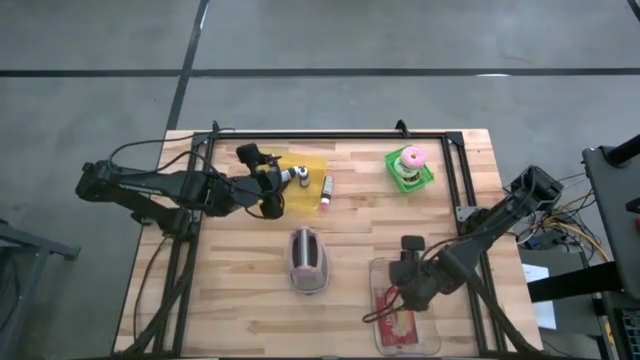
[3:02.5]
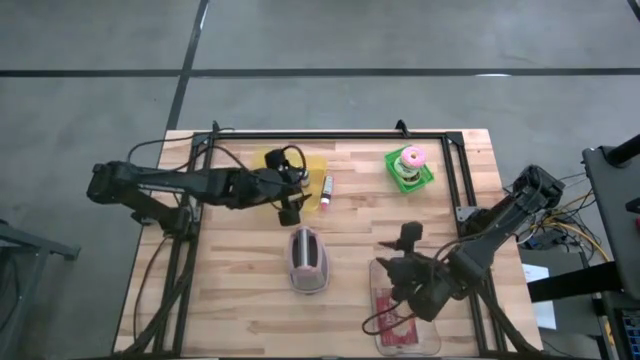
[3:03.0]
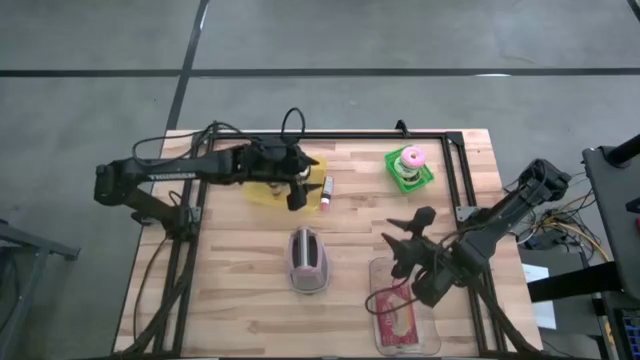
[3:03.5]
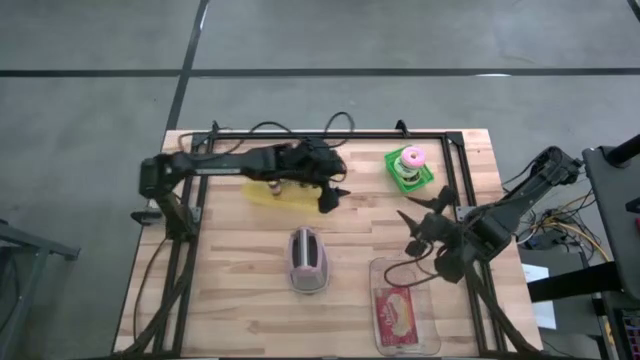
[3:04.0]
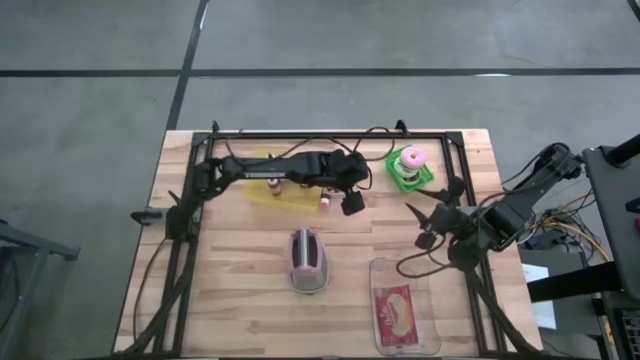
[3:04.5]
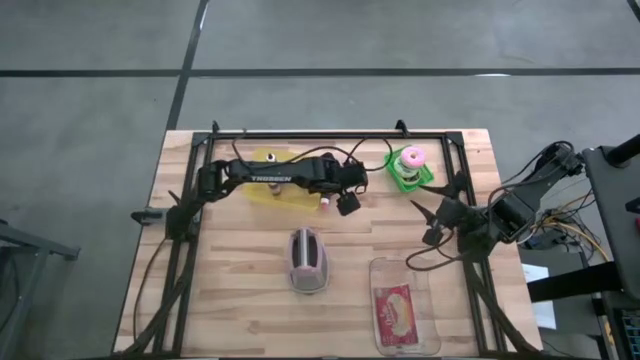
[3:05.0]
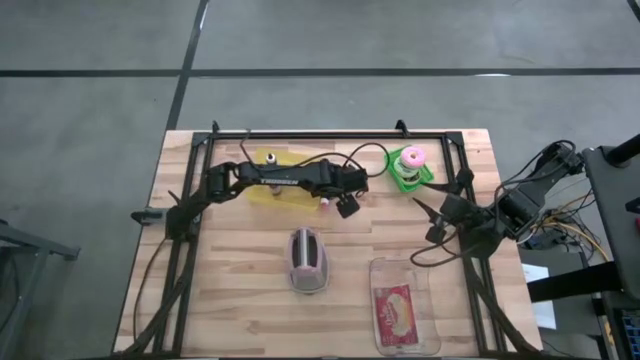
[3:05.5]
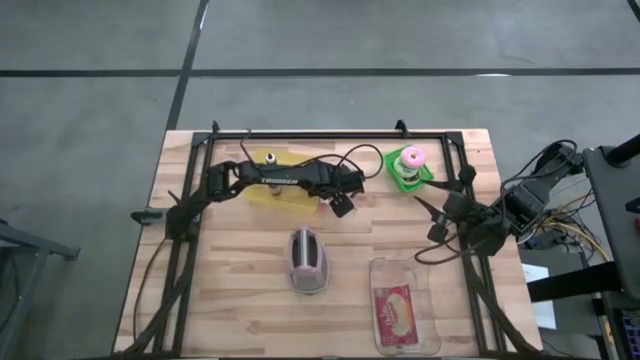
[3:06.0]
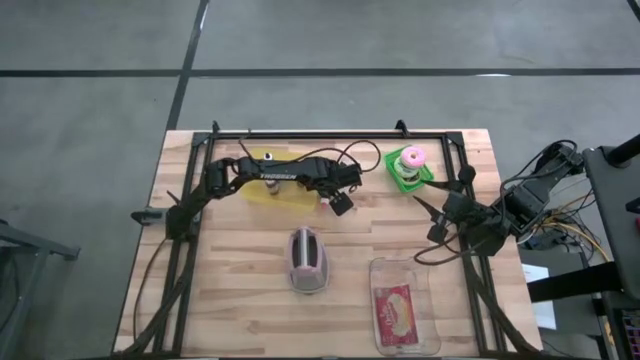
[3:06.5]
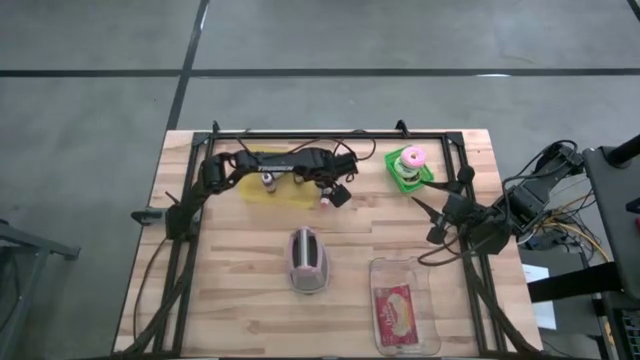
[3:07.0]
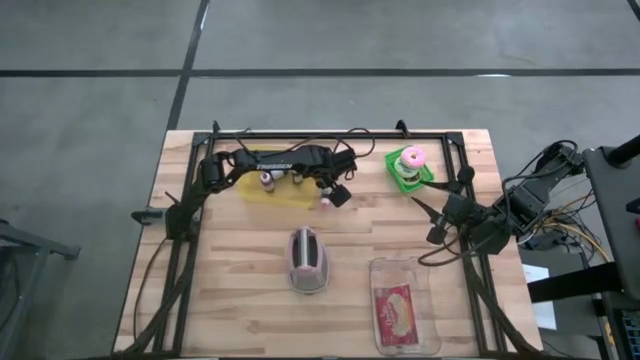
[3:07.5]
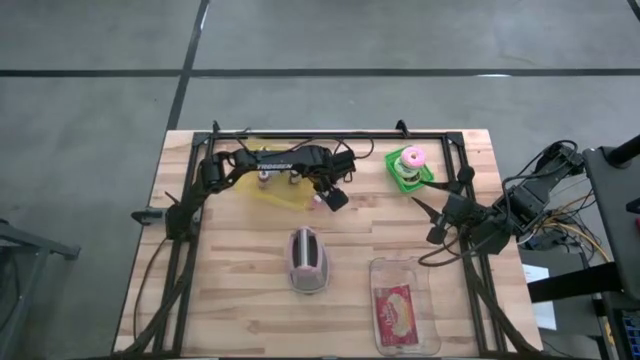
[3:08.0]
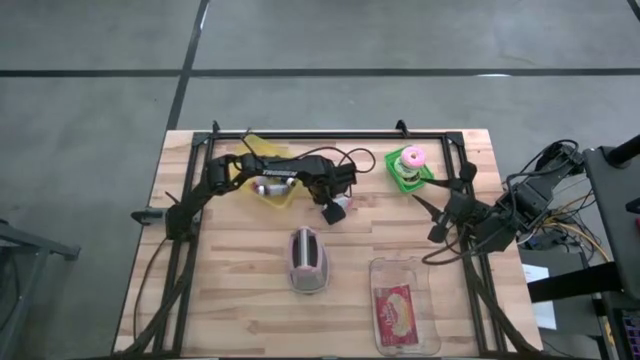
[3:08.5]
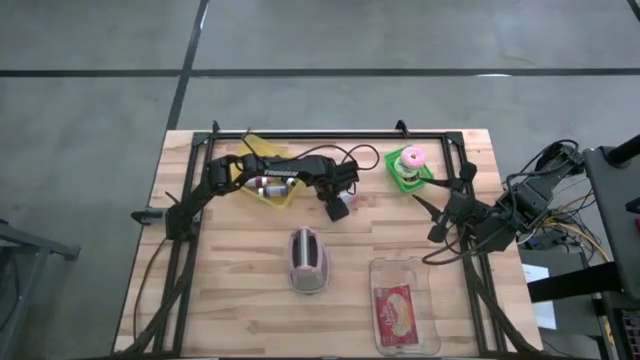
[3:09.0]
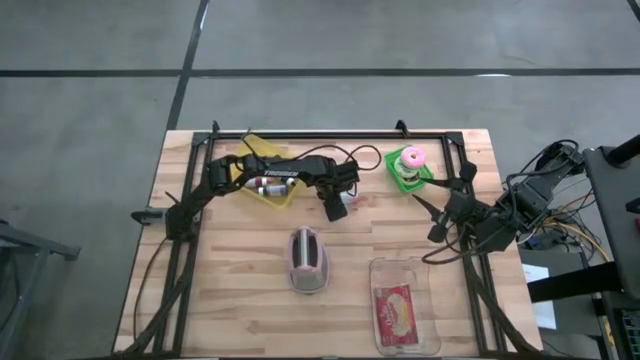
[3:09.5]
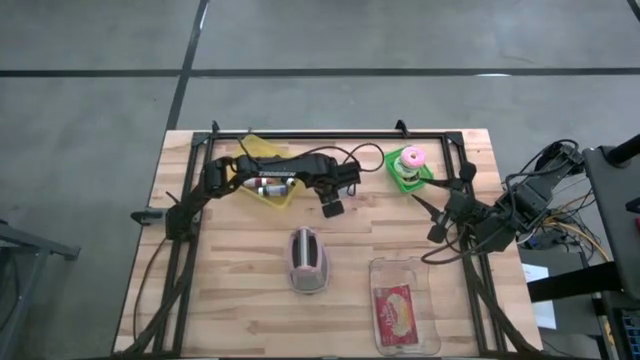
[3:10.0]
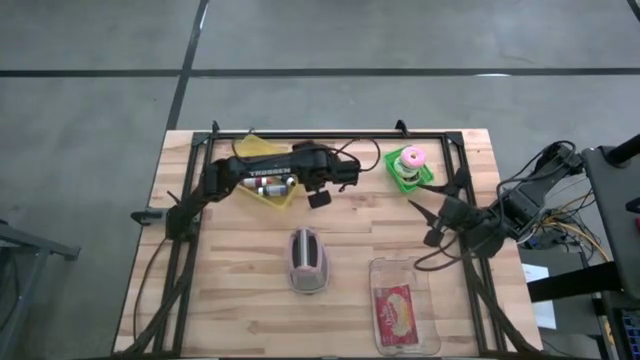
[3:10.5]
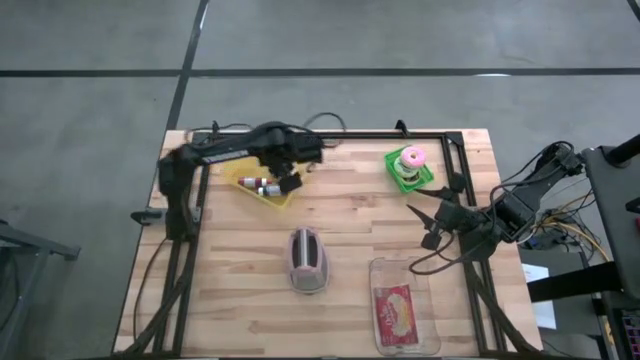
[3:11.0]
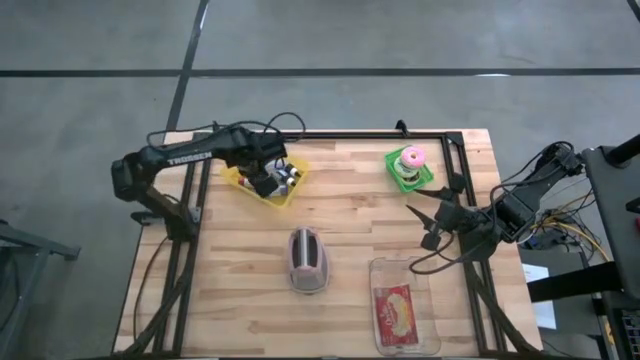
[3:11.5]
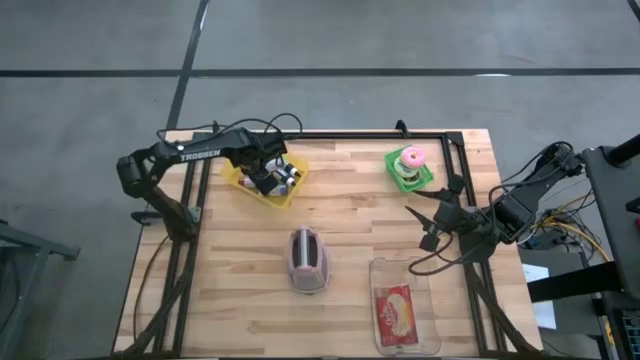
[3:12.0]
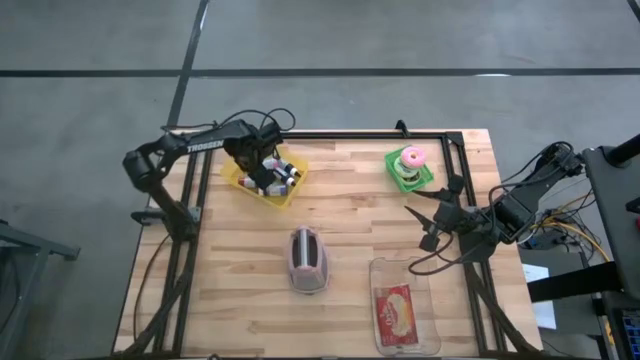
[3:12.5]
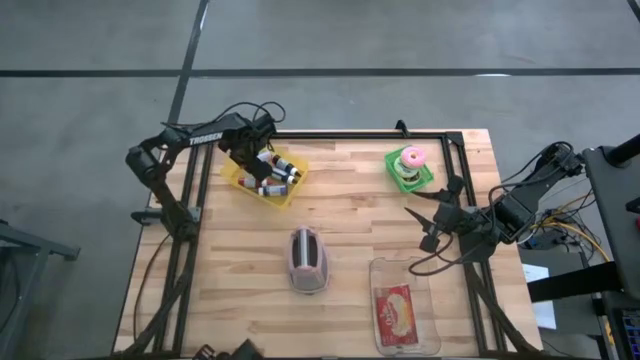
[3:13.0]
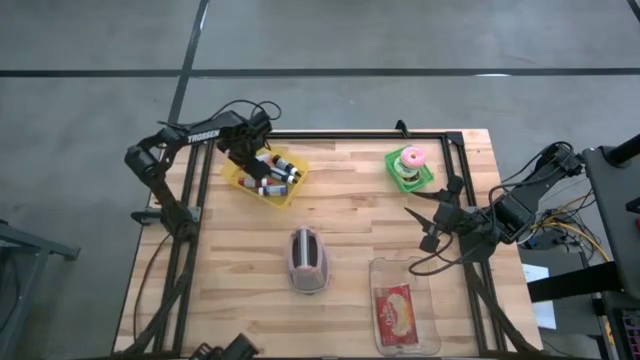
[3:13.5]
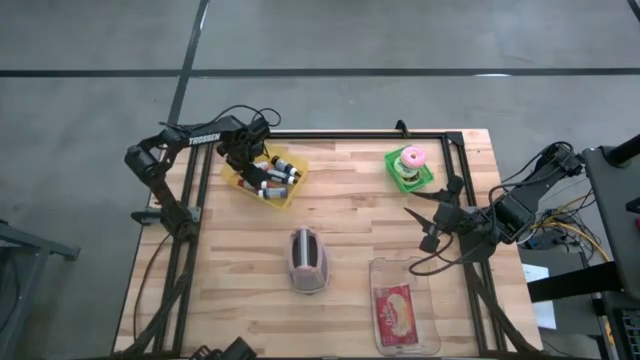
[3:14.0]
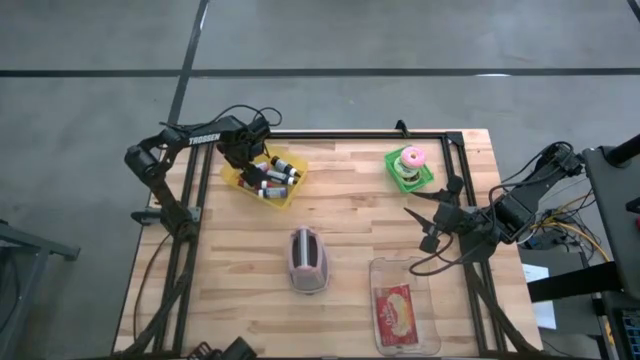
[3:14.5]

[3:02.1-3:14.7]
Task: Pick & Place Food Item
Put the pink food coloring into the yellow bin

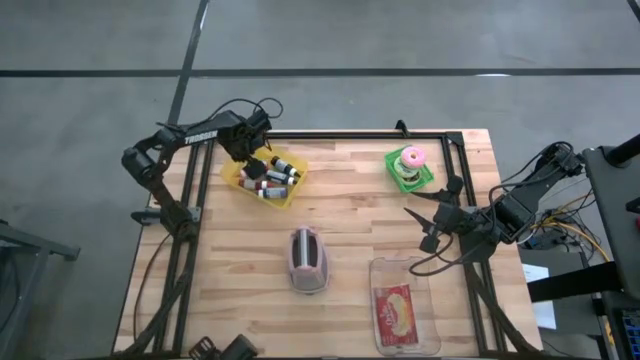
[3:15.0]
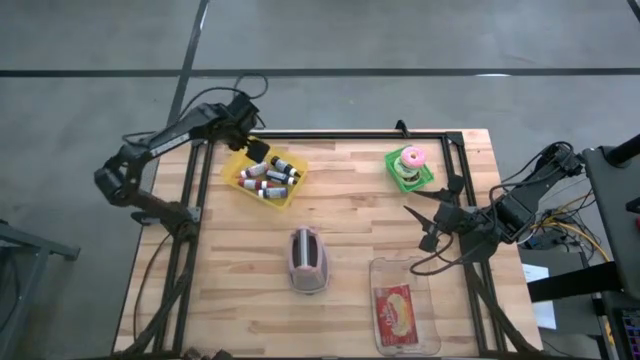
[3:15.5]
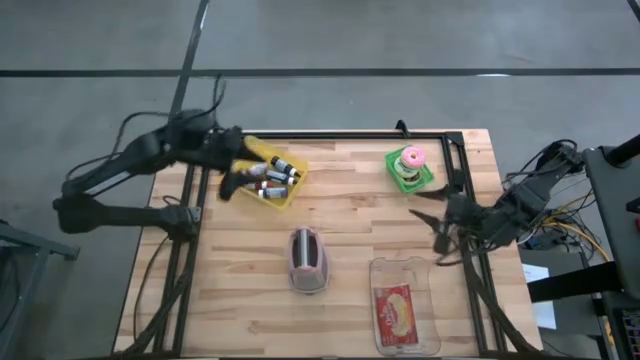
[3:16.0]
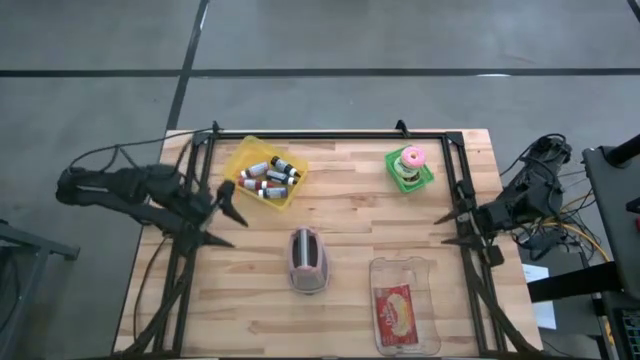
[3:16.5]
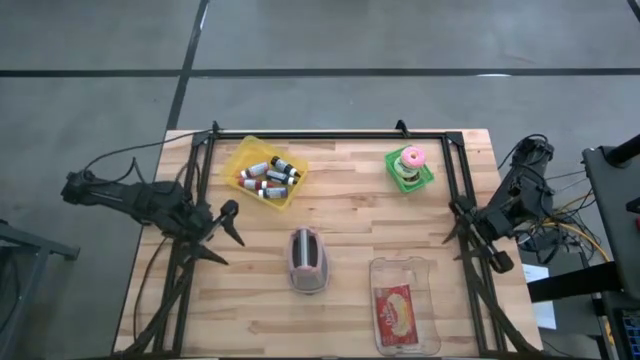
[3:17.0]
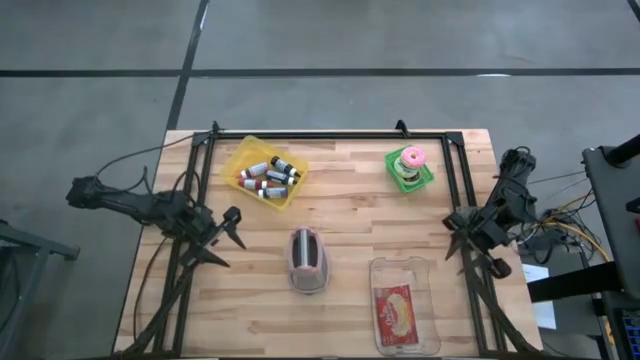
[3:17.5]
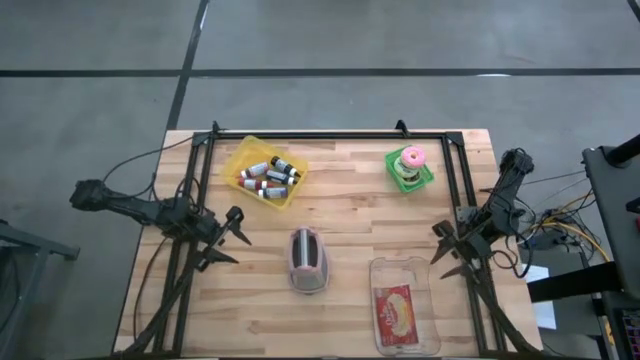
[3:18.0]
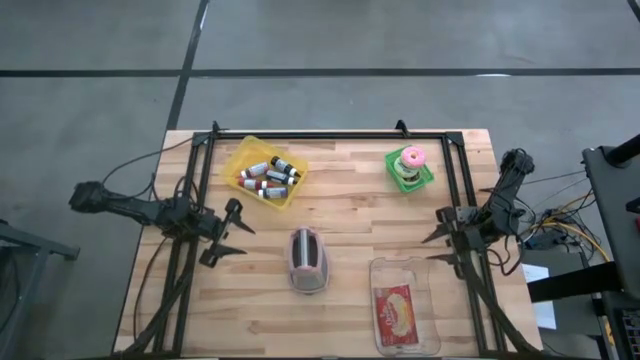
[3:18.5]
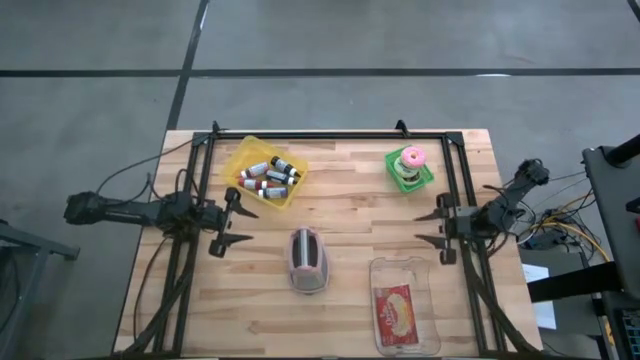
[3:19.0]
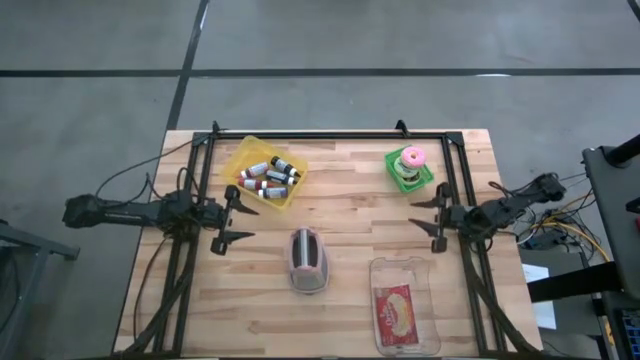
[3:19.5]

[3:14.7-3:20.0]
Return to Home Position

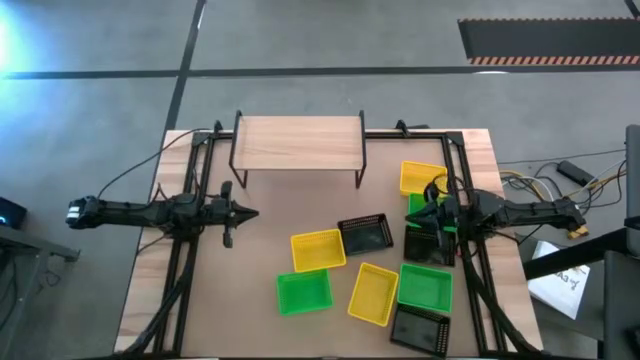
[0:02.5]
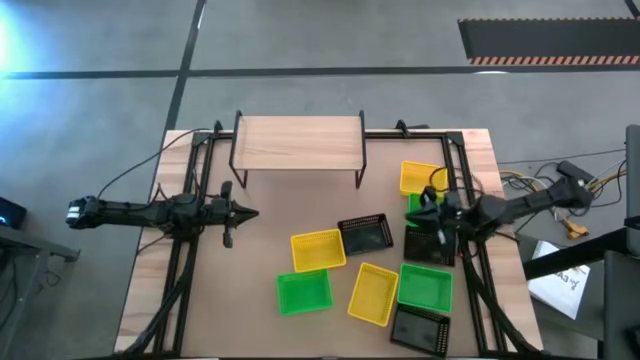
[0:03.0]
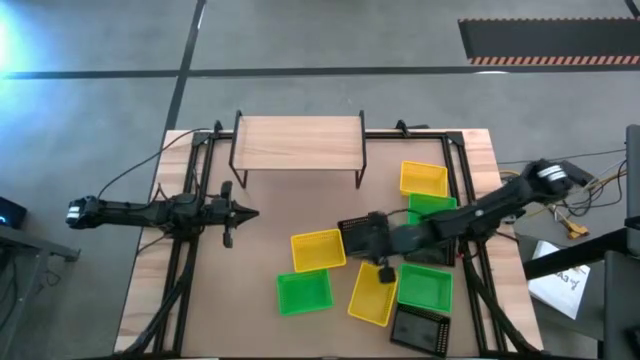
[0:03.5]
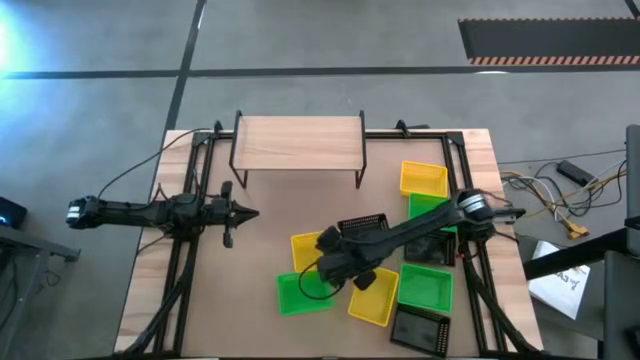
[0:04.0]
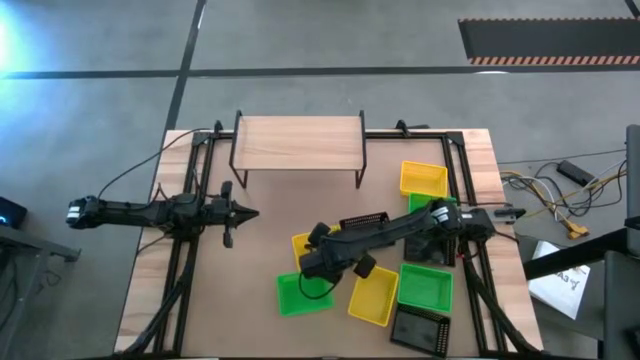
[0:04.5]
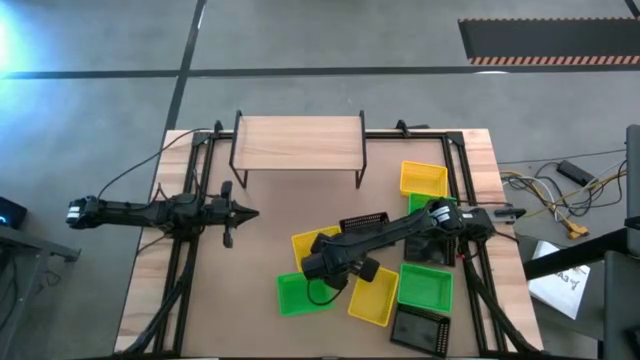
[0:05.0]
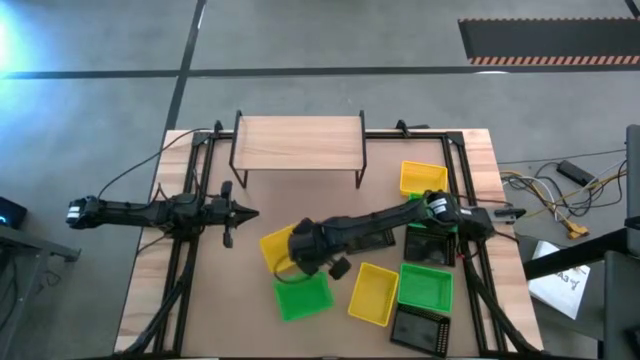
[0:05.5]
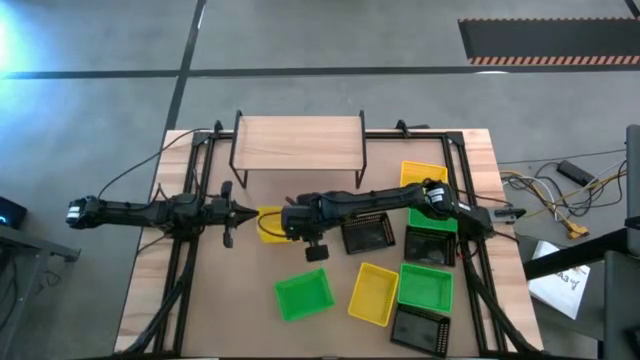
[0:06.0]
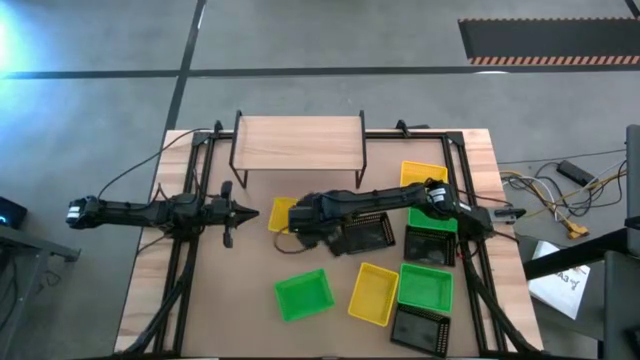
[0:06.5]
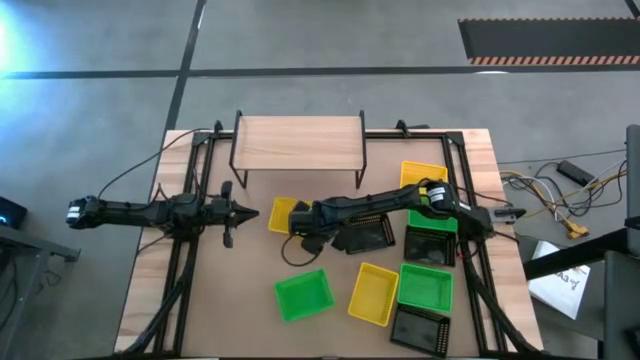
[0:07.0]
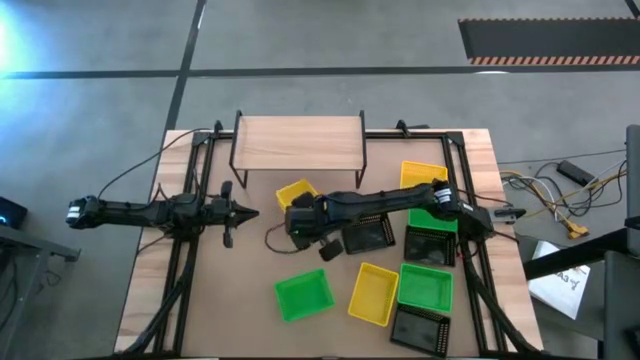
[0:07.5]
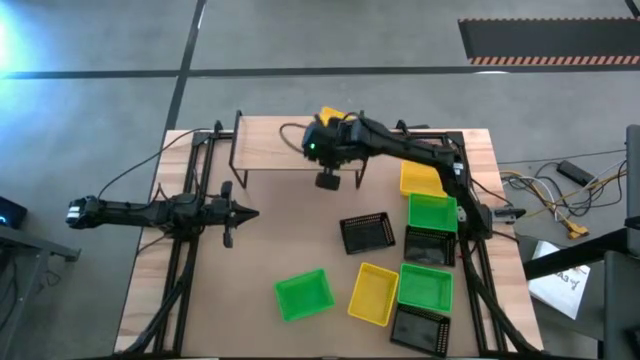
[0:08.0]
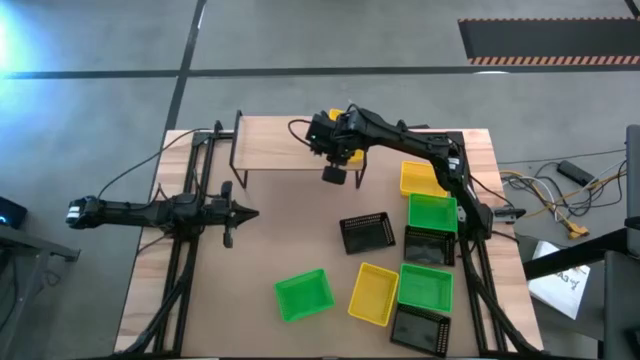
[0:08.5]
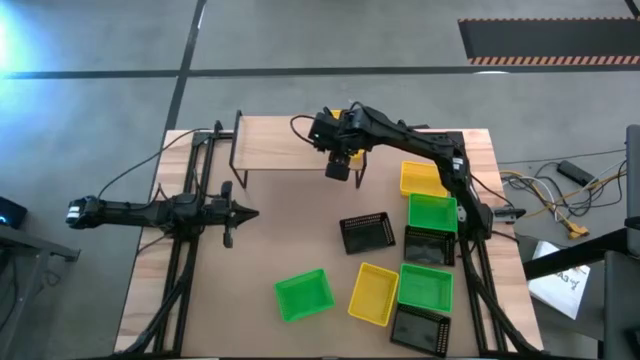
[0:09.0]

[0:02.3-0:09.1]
Task: Stack baskets on shelf by color
Put the left yellow bin on the shelf
